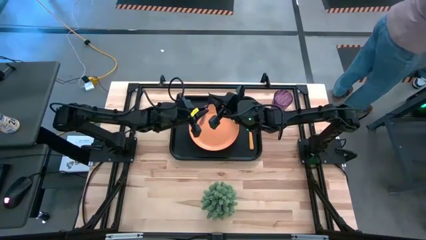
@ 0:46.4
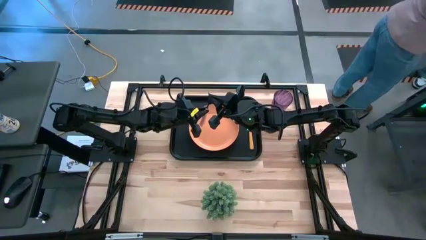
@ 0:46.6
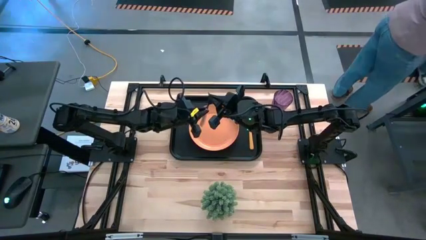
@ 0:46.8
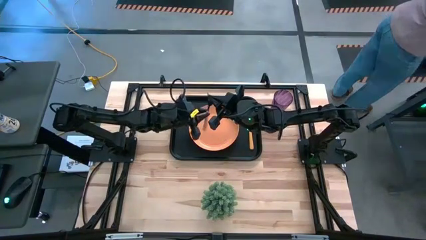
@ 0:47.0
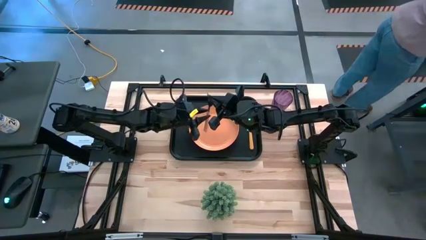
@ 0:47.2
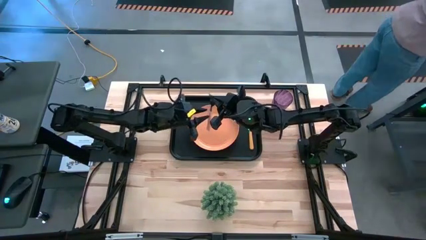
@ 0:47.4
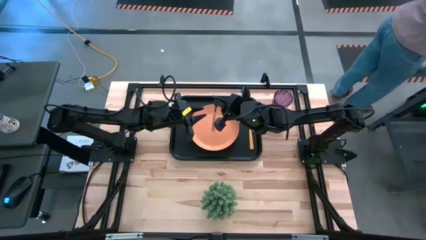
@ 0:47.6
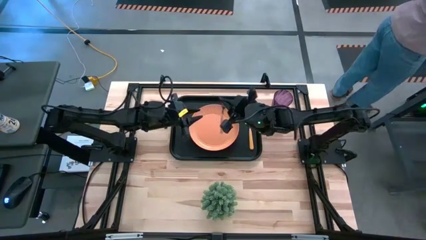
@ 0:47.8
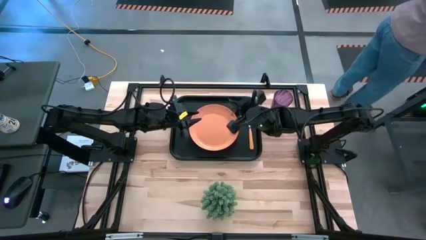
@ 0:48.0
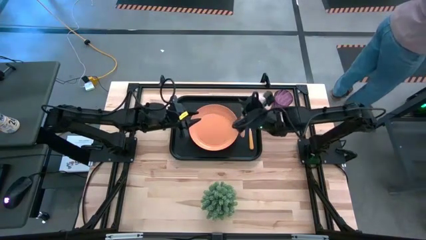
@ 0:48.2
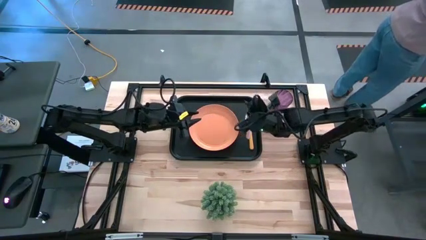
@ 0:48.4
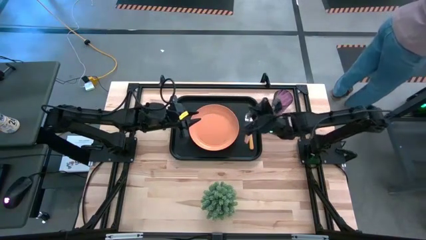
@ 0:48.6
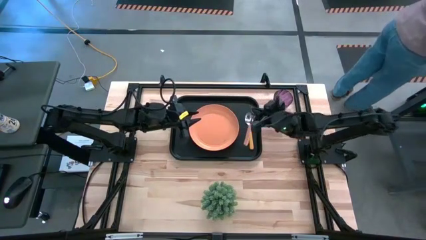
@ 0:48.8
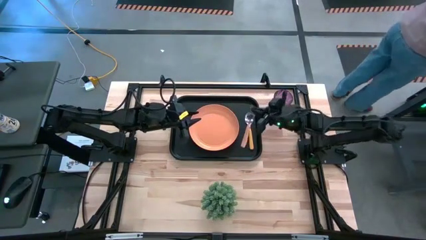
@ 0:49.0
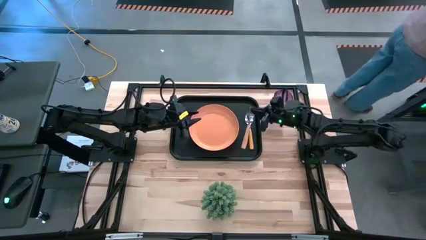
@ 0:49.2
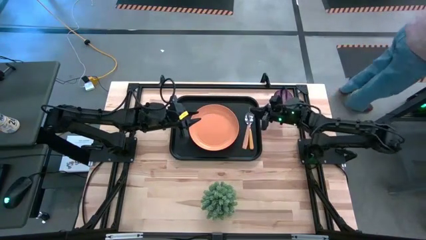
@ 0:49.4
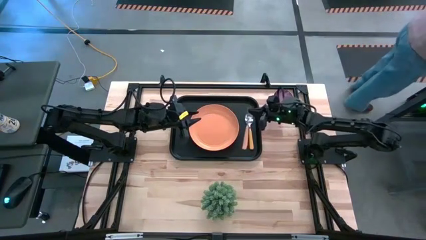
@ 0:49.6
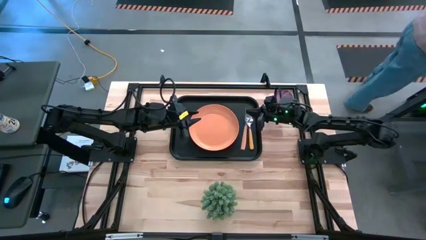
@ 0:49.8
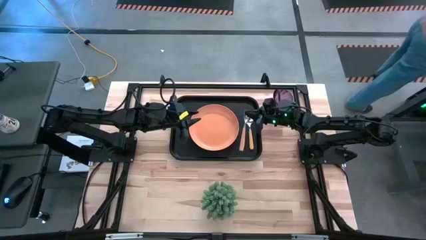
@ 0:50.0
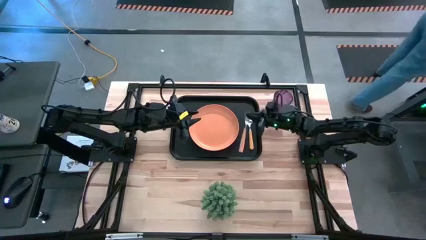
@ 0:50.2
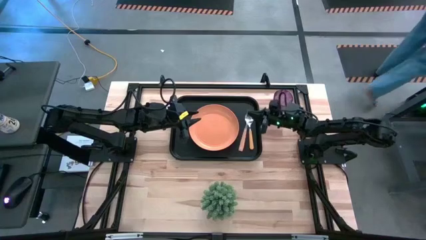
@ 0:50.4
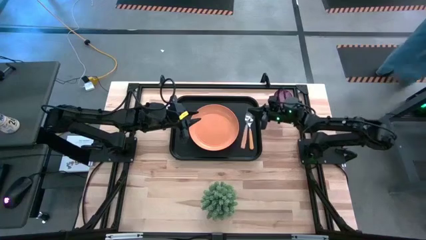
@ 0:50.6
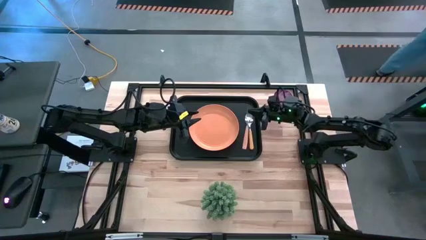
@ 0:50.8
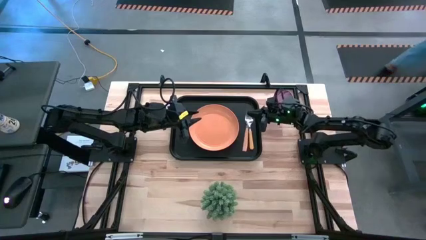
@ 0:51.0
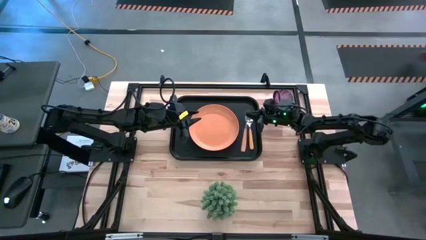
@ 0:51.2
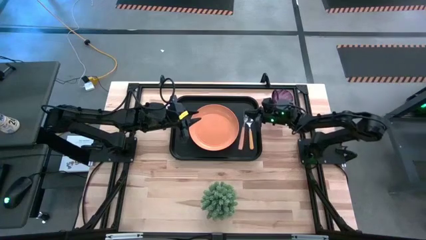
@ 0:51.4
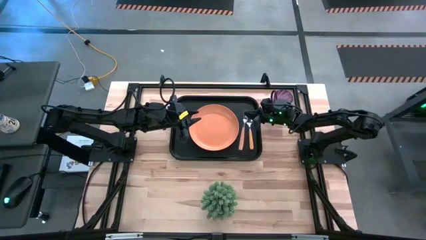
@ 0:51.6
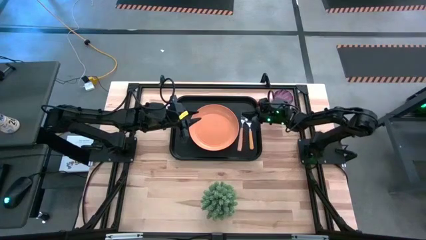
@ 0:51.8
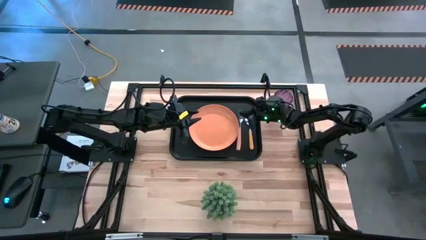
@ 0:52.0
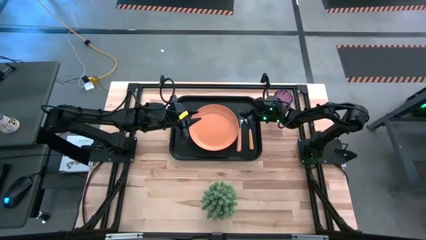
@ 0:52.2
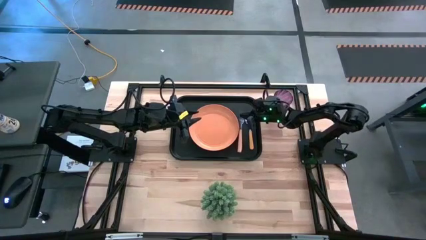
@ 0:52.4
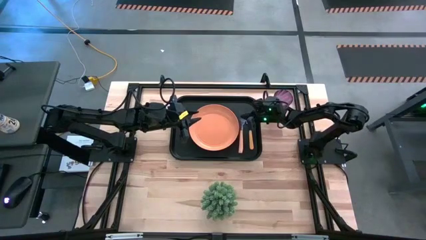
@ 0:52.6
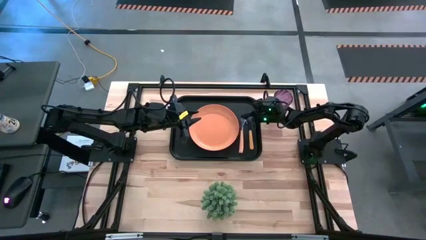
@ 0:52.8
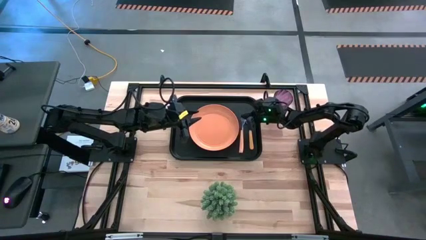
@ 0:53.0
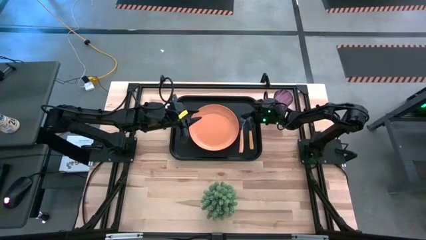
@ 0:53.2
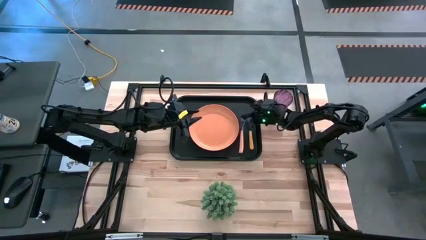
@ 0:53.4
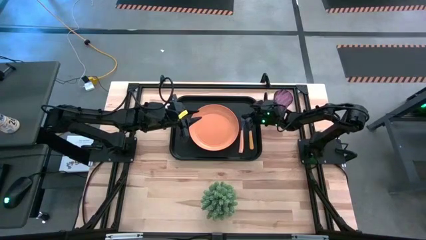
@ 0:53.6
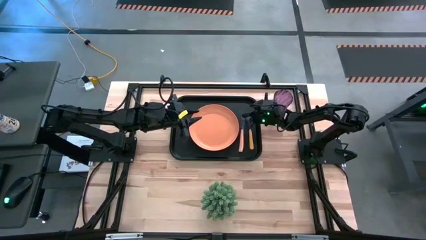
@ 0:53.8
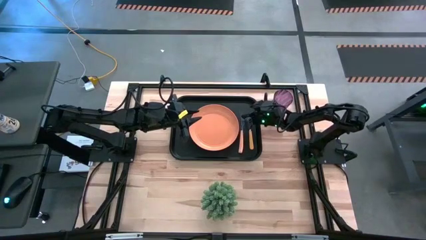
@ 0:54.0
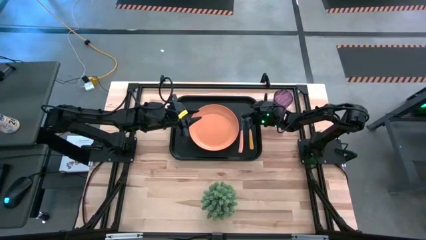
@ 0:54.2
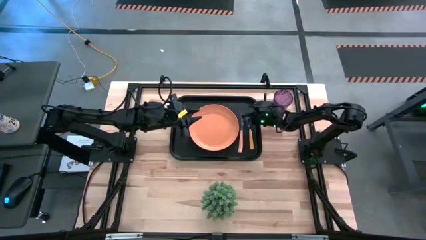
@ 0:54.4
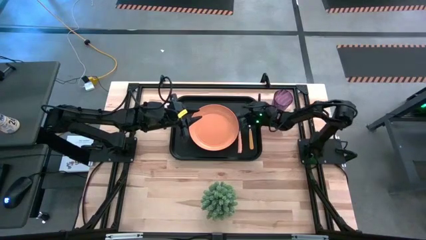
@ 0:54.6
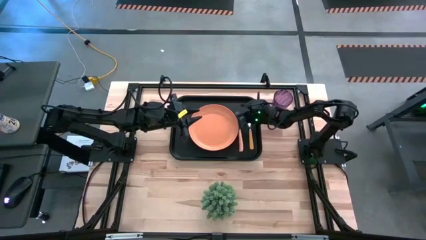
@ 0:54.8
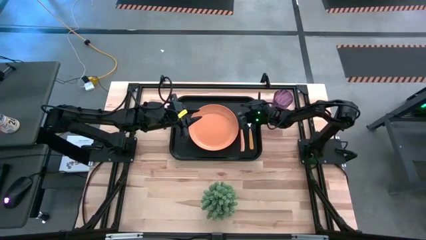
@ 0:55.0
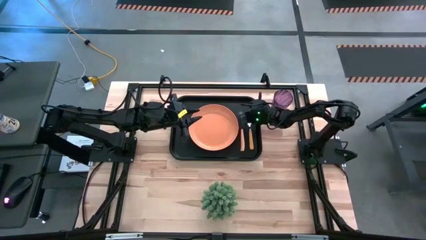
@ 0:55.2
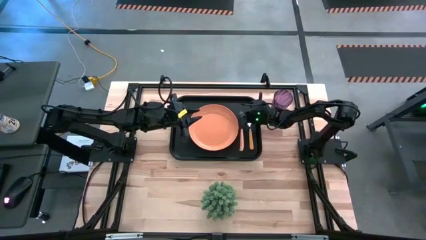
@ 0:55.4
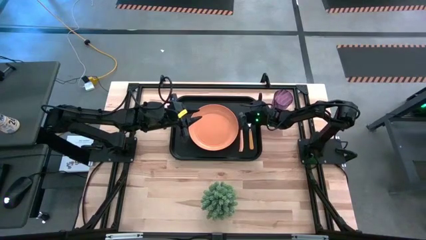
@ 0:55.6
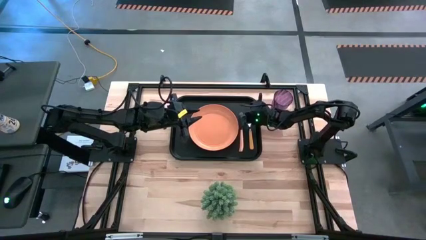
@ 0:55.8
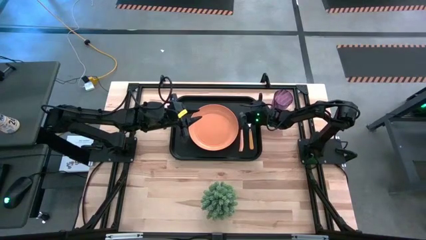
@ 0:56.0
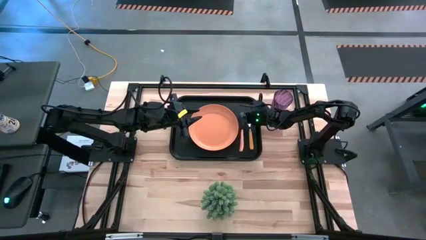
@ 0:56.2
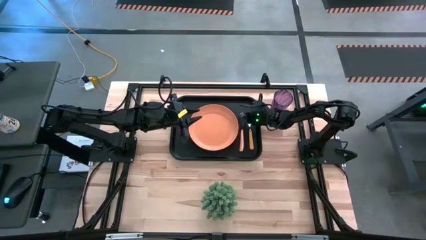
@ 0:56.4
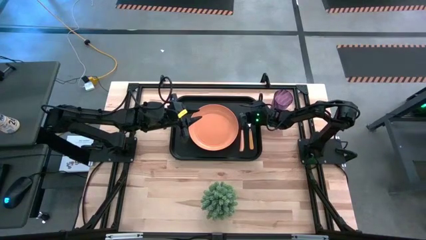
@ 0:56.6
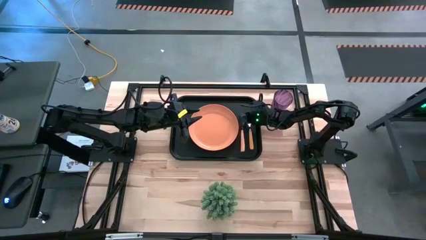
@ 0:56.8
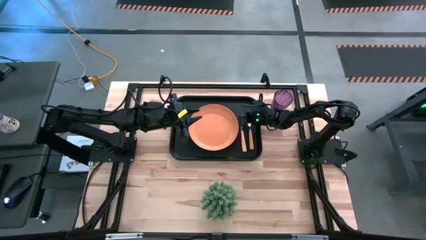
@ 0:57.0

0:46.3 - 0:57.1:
Task: Pick and place plate/cup/fork/spoon on tray
Put the yellow fork on the black tray

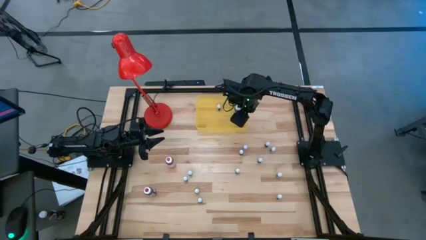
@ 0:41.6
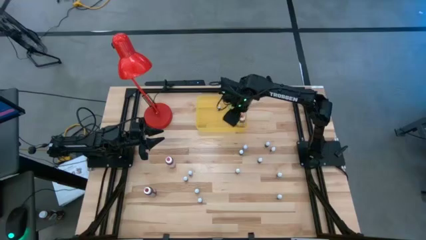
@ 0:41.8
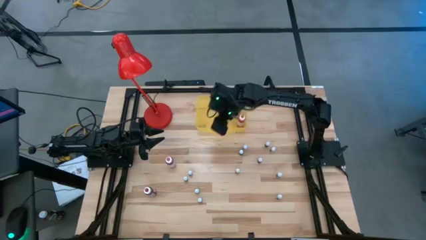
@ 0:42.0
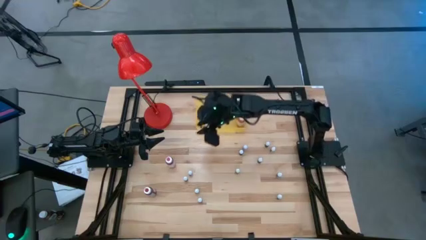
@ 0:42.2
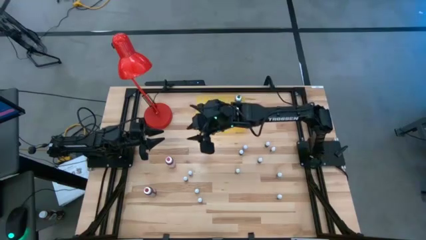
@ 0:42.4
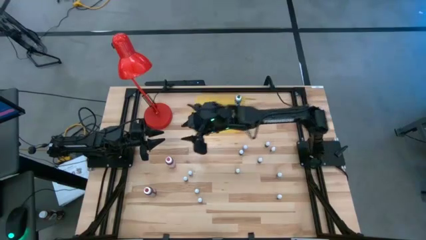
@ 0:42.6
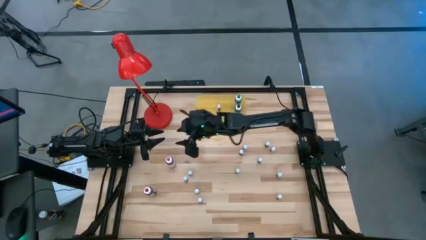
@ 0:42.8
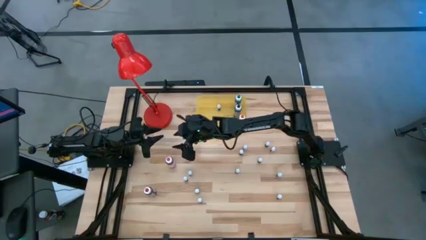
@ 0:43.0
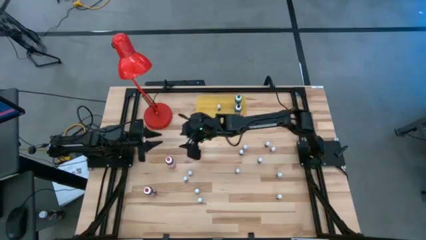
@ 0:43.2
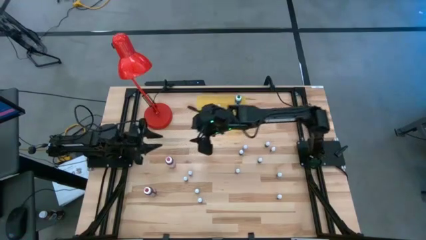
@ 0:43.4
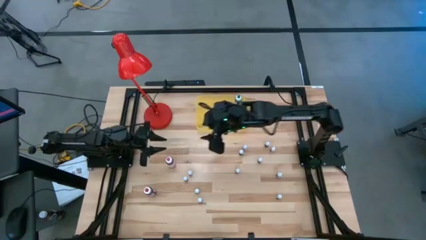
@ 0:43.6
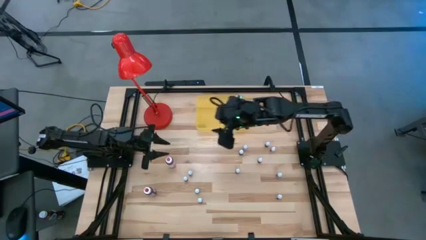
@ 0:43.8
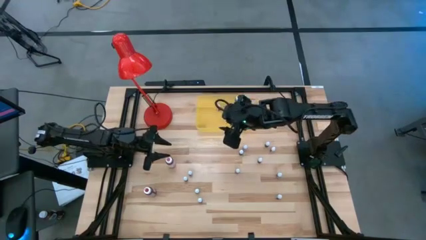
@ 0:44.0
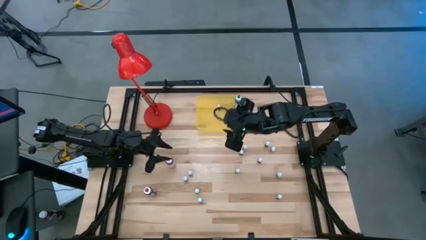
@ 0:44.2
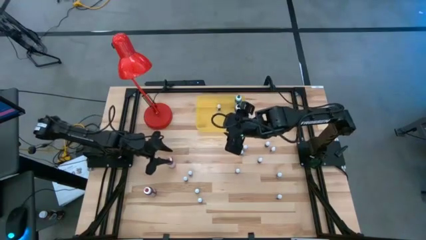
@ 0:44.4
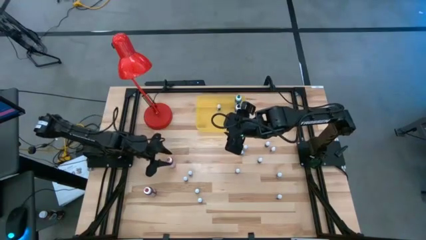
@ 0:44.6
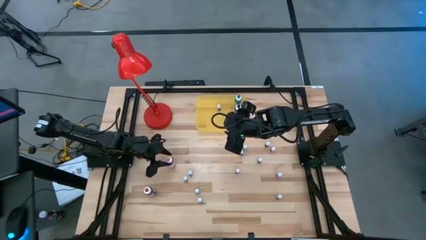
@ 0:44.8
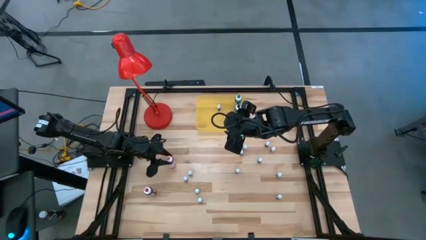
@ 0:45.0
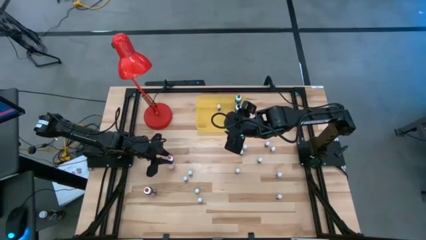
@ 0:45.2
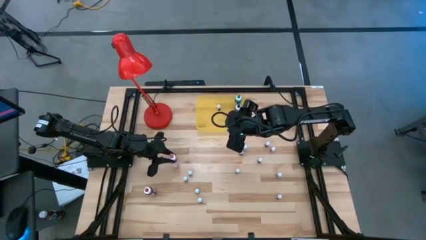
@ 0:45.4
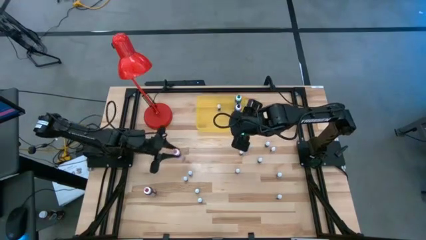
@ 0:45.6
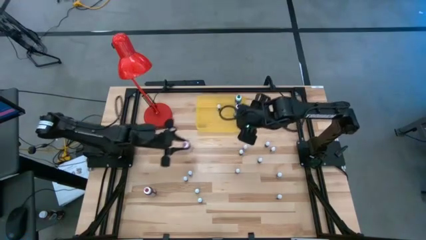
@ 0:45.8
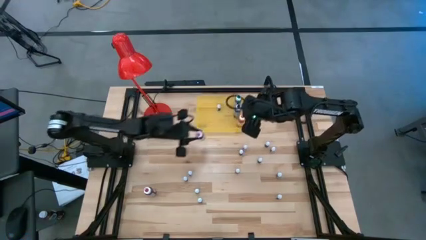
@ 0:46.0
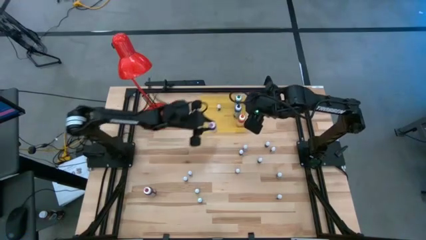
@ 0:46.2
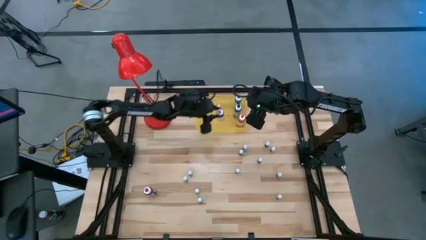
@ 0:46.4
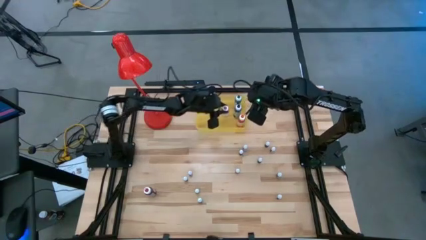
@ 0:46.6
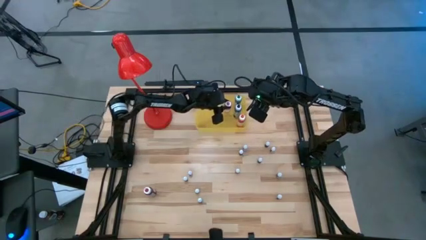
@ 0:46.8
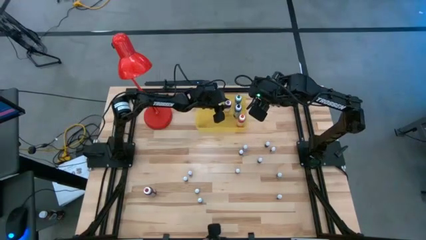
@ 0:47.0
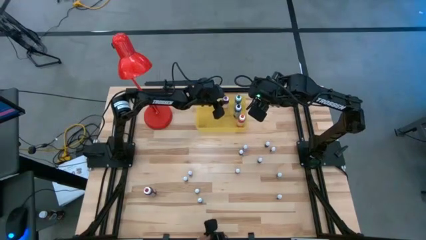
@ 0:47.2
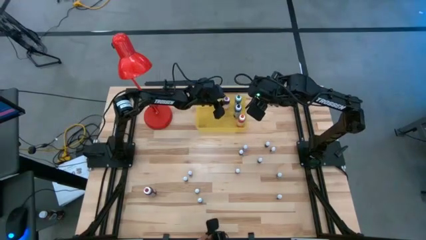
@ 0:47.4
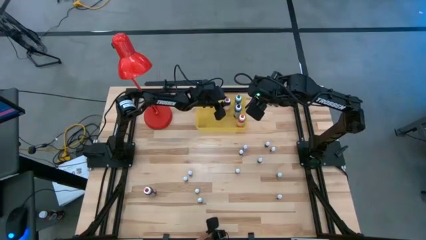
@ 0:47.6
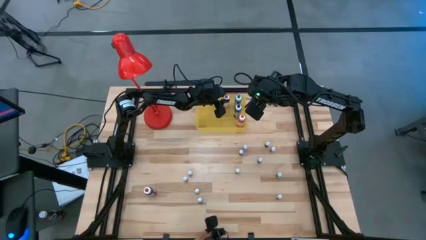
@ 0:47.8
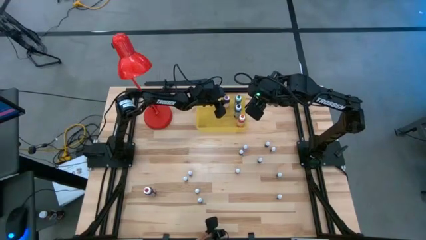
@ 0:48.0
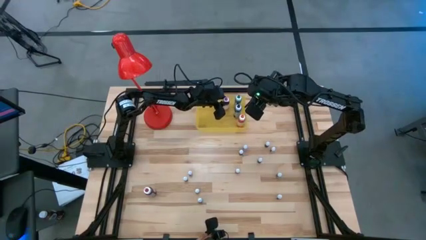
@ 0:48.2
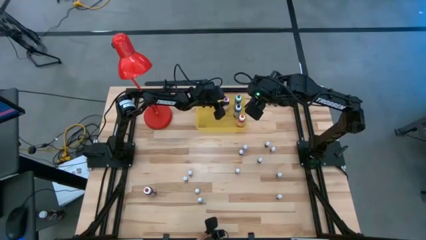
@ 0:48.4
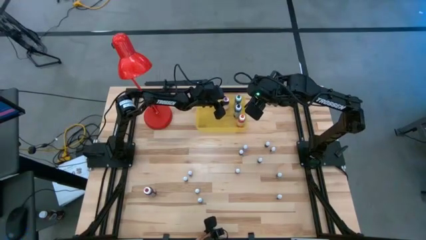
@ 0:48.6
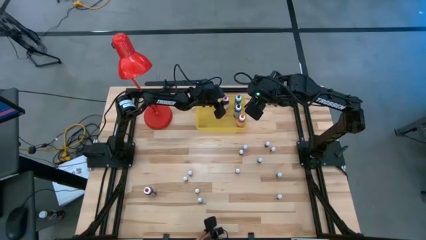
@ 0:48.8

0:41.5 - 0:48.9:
Task: Pick & Place food coloring
Put the large pink food coloring bottle into the yellow bin
